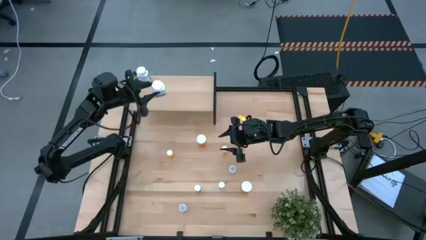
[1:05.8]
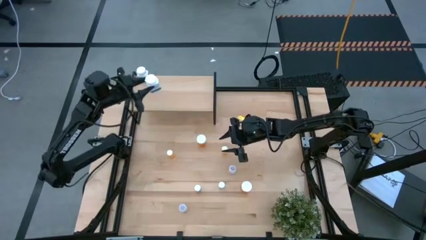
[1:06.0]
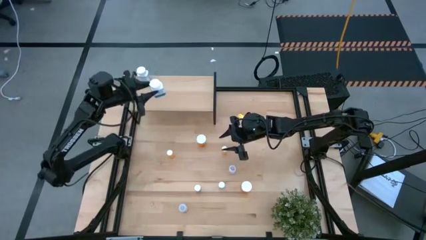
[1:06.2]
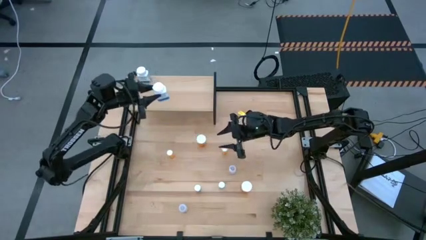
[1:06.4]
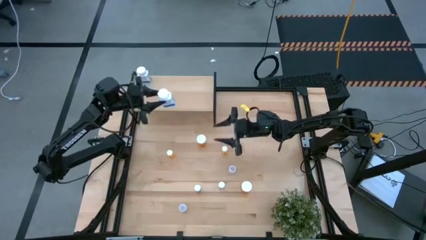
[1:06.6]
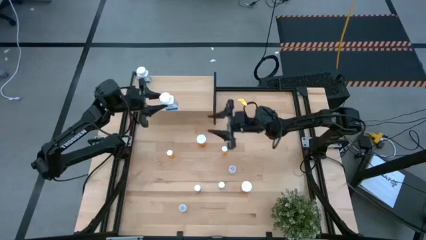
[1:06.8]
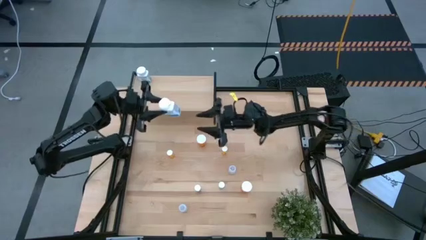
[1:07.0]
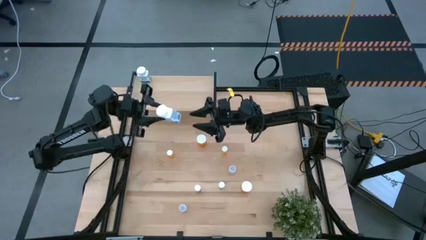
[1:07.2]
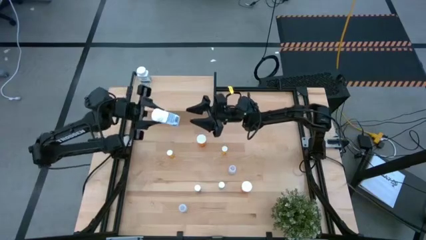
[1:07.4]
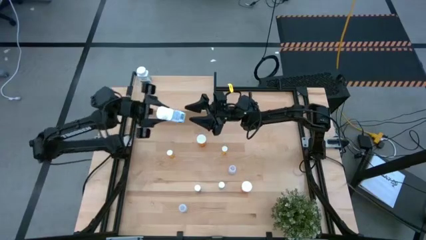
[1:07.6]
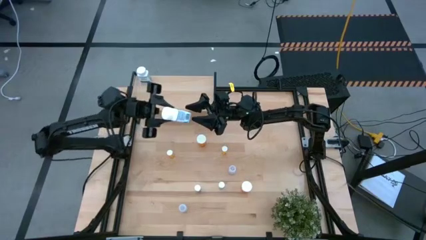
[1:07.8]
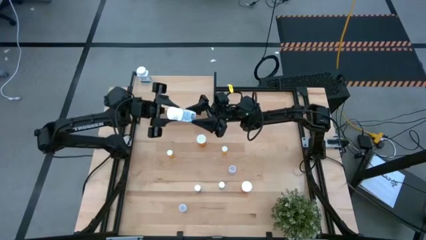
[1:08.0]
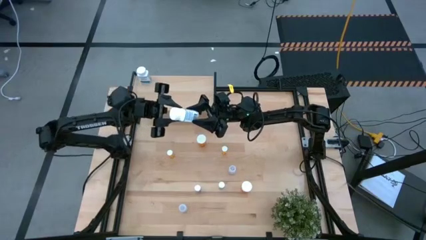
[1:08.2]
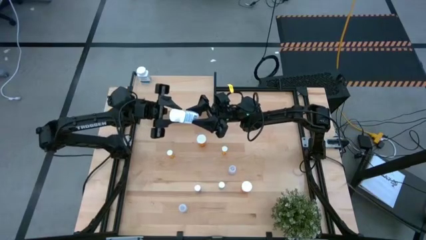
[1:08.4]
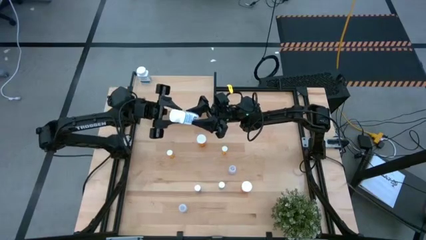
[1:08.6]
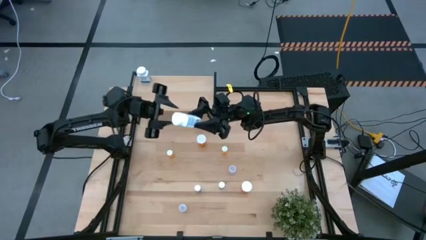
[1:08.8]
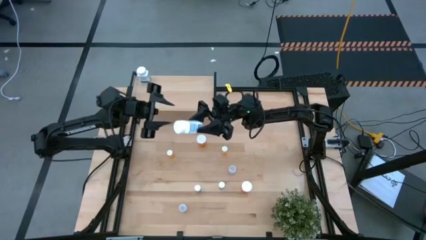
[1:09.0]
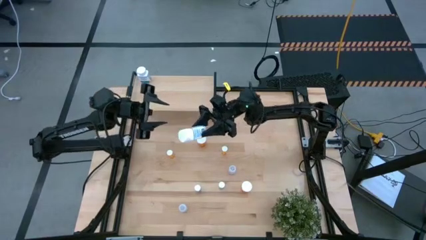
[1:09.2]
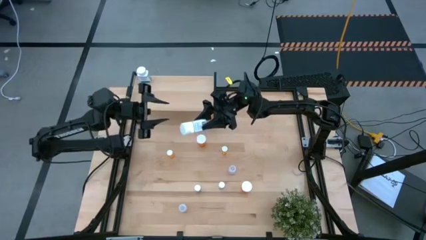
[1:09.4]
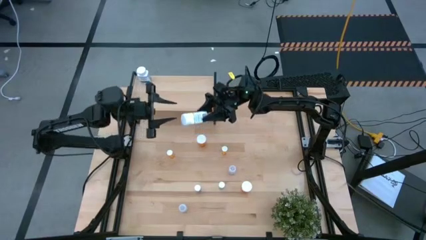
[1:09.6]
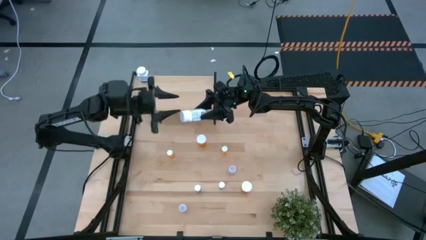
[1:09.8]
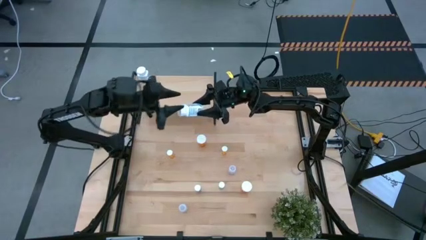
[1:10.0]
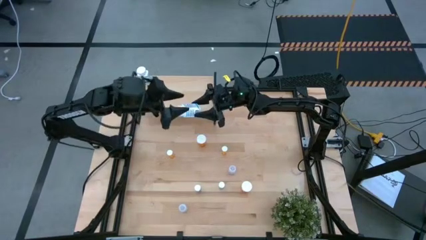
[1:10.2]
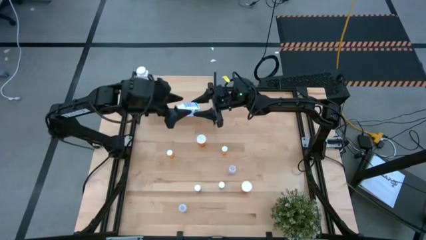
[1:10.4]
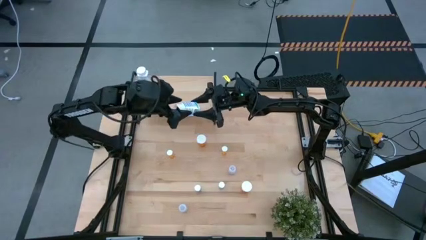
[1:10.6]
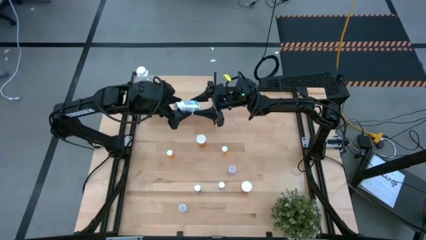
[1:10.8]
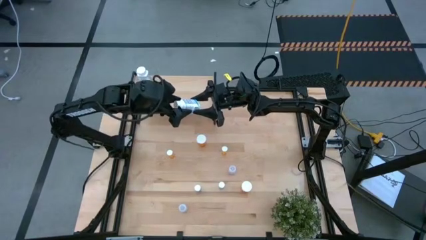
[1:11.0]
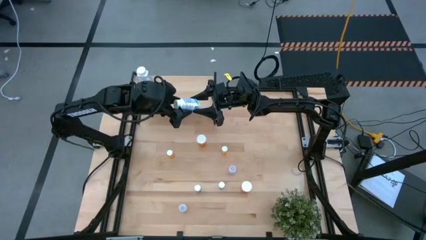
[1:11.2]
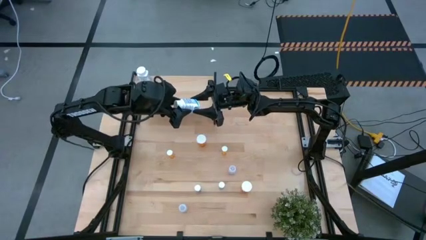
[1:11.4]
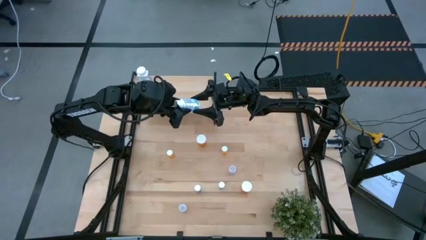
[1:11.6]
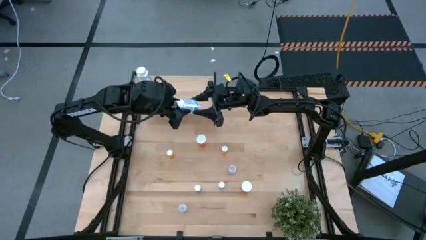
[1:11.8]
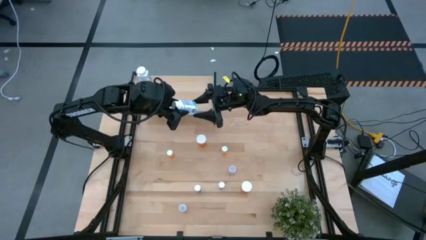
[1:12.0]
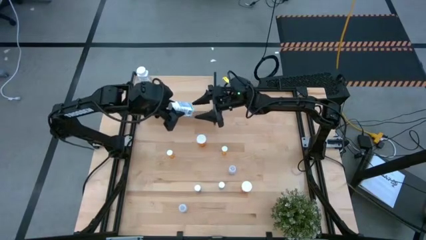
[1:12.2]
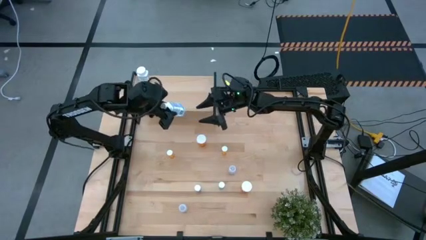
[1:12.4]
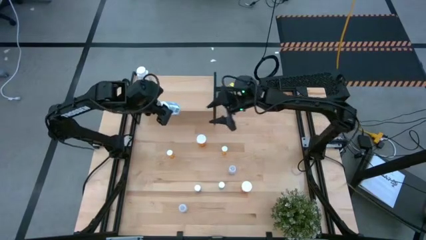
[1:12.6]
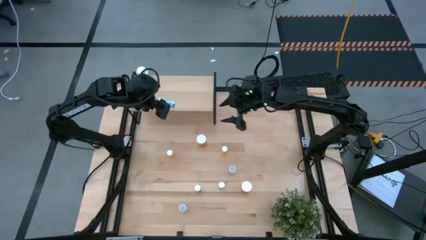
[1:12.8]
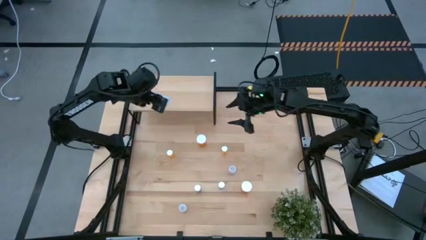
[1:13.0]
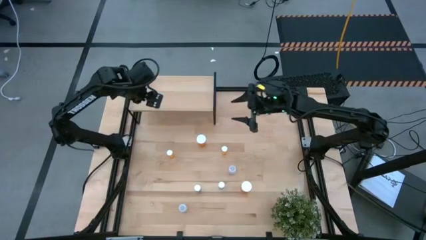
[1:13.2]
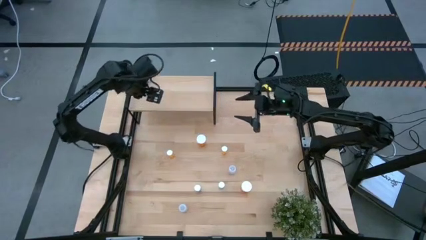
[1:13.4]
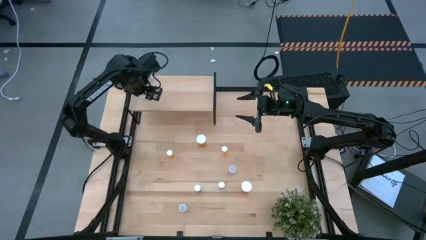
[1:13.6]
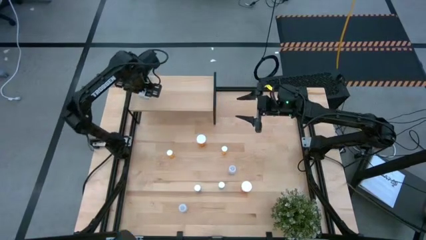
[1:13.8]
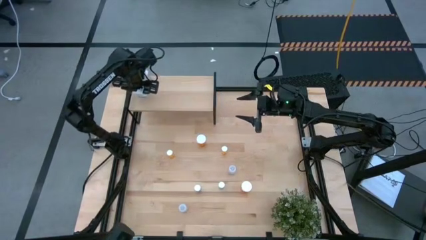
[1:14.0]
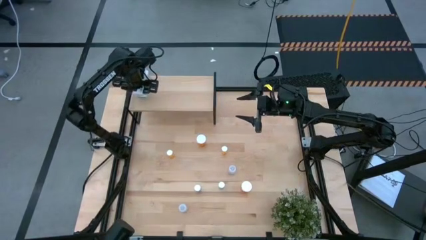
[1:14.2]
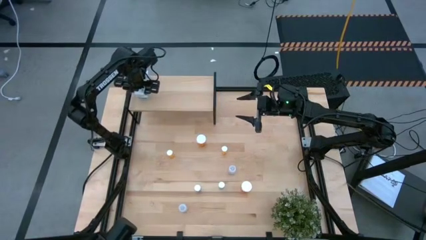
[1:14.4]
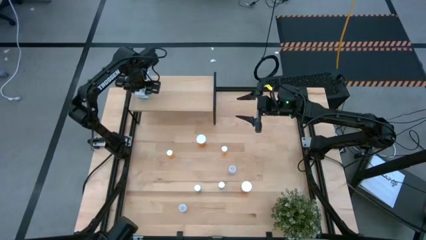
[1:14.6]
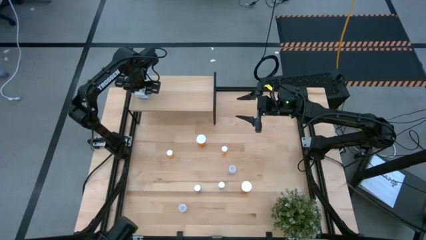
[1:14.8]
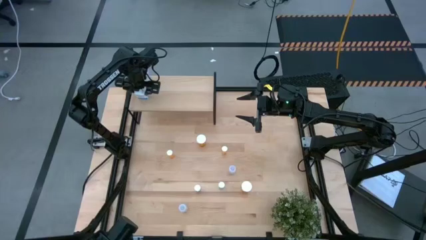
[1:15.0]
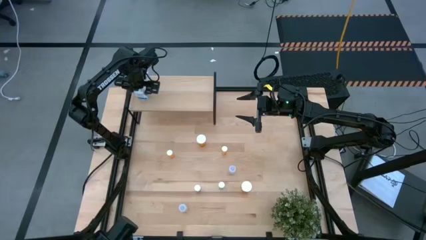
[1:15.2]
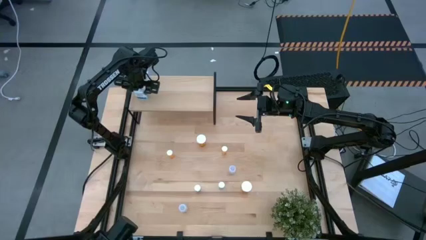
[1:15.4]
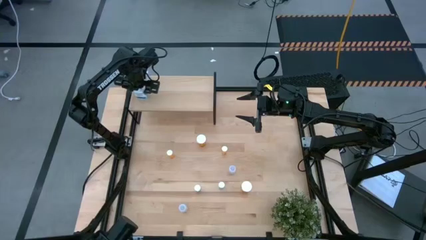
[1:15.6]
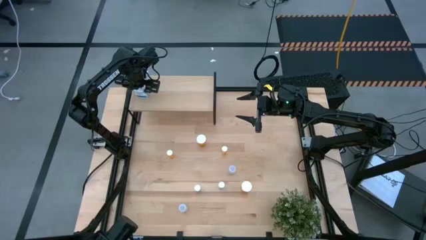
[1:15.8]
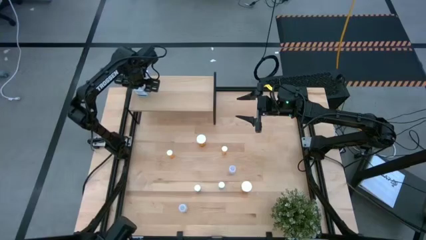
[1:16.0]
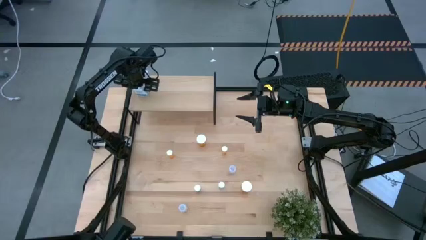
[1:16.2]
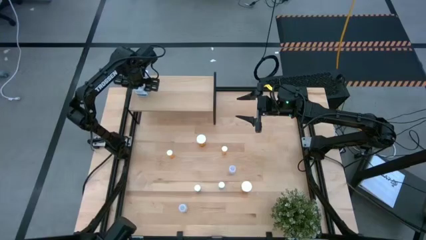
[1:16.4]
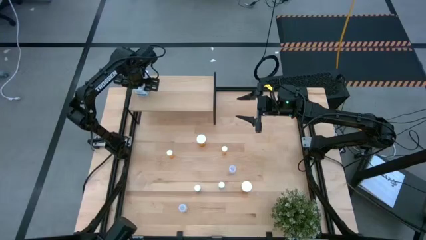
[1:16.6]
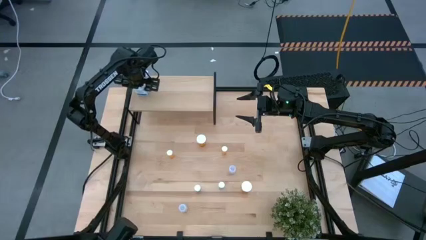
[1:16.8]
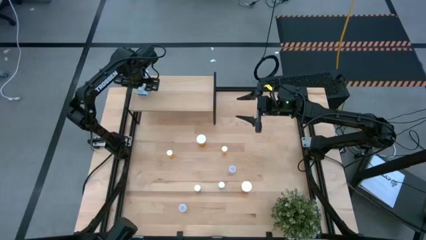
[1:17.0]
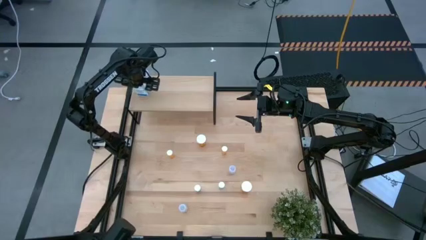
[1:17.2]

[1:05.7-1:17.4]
Task: Pick and place medicine bottles onto shelf by color
Put the white pill bottle on the shelf aligned with the other white pill bottle

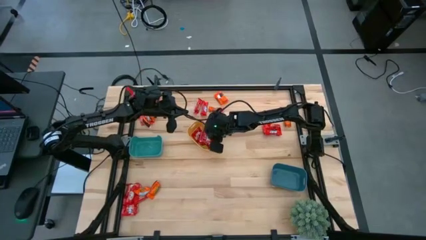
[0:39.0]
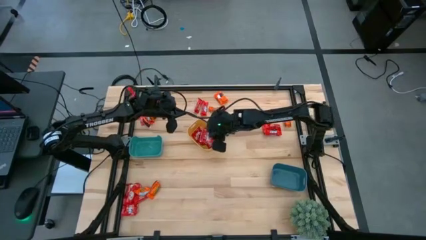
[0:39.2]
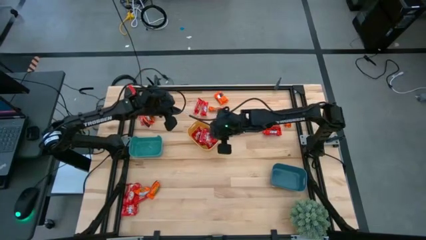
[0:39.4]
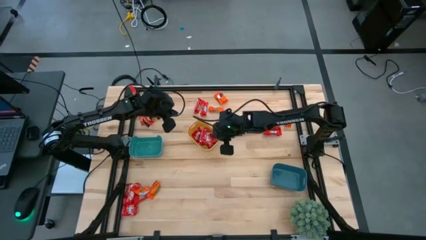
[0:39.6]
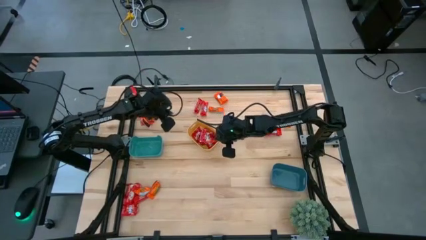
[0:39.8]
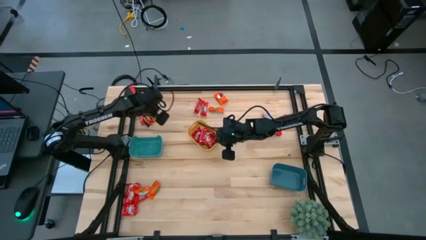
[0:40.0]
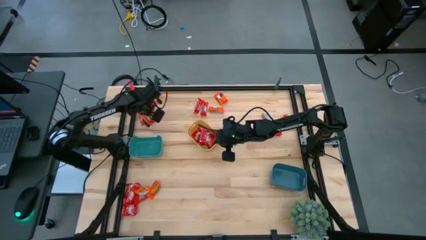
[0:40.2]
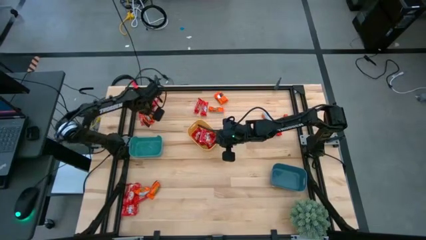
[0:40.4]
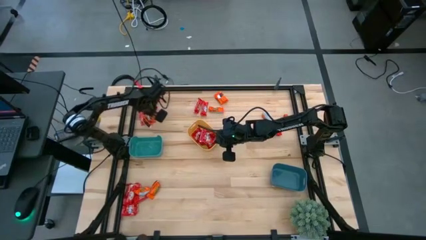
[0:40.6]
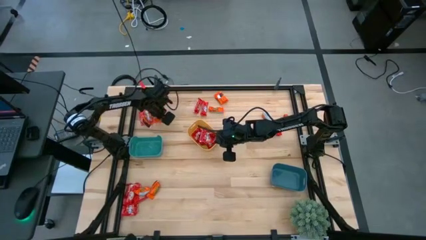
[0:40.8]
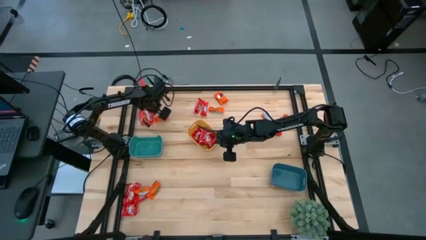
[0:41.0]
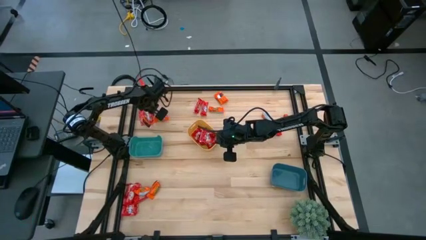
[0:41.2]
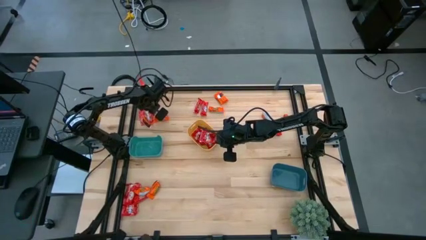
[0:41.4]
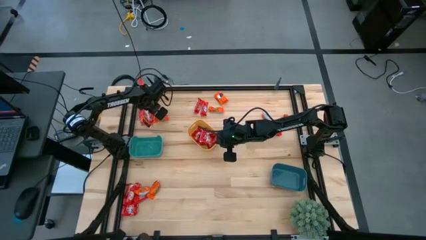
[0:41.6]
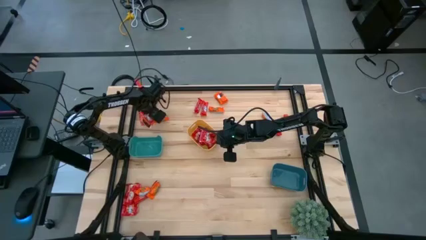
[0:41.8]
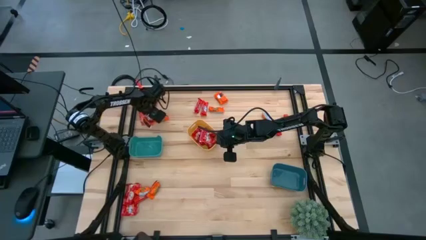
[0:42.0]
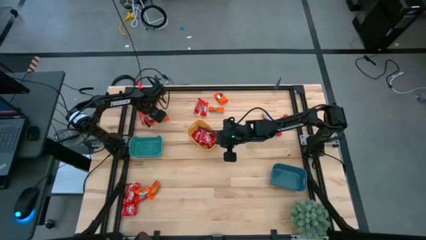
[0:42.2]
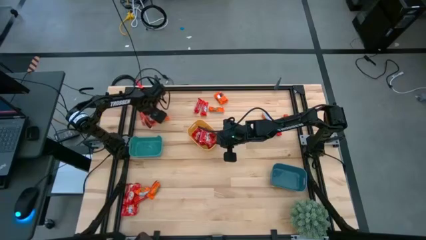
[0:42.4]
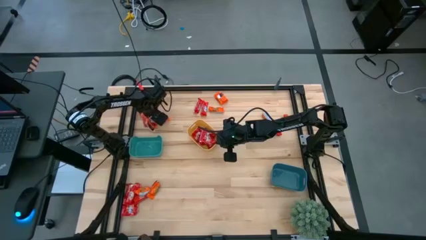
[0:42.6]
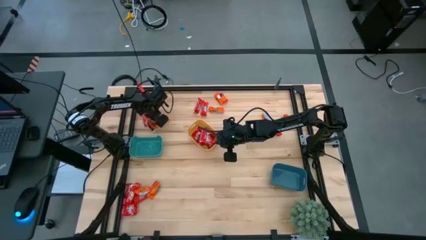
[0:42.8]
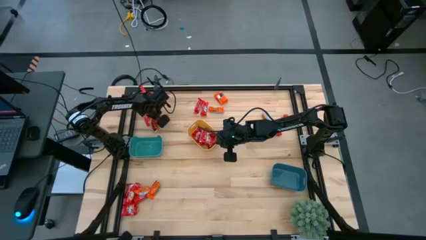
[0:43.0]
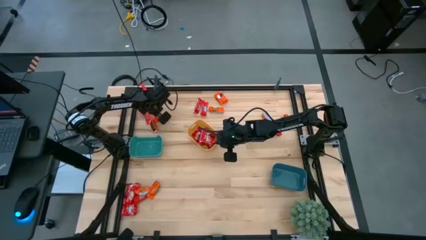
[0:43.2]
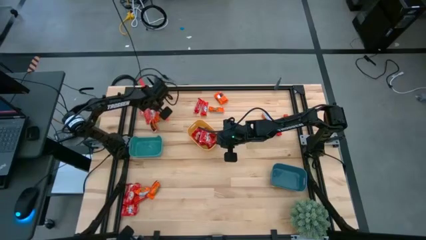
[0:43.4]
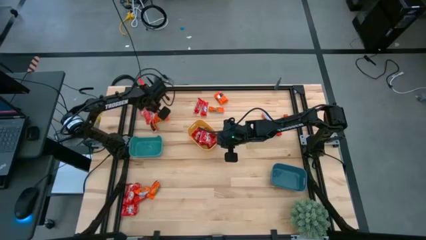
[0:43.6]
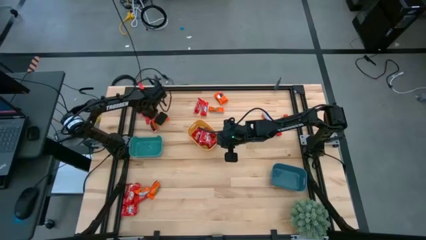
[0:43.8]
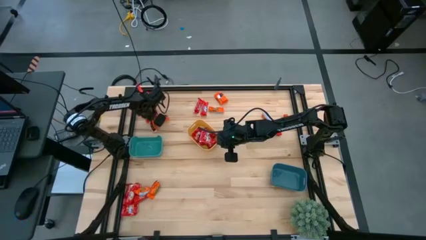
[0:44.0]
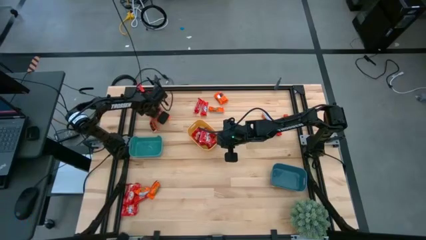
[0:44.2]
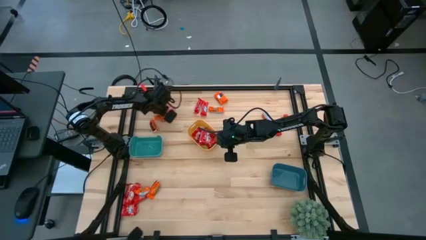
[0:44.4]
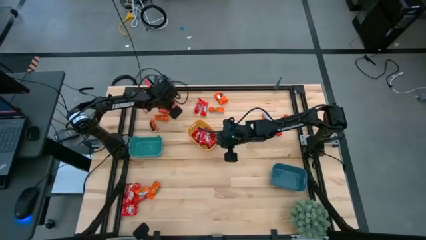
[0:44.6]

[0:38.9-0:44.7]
Task: Sort candy
Put the red candy into the yellow bin
